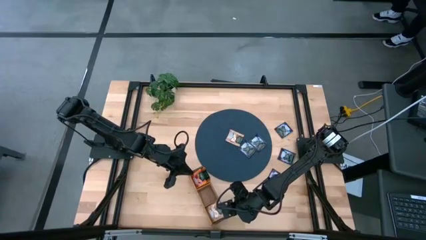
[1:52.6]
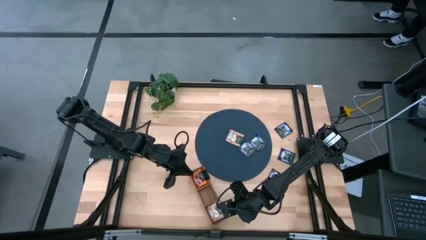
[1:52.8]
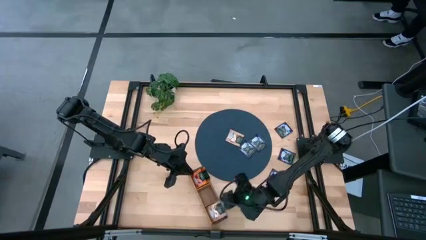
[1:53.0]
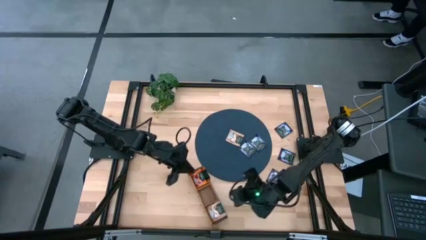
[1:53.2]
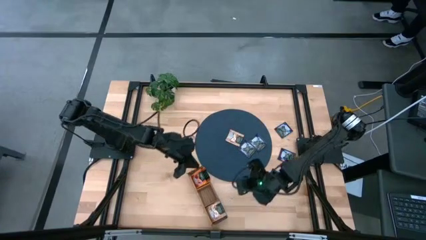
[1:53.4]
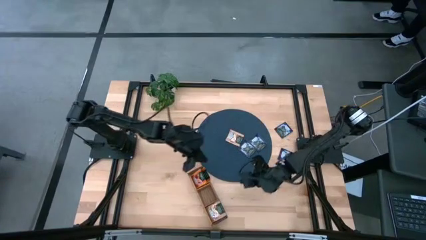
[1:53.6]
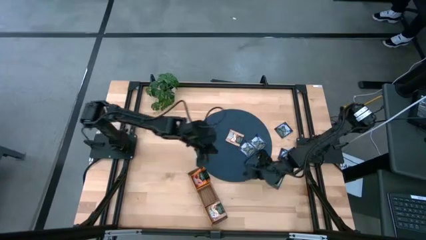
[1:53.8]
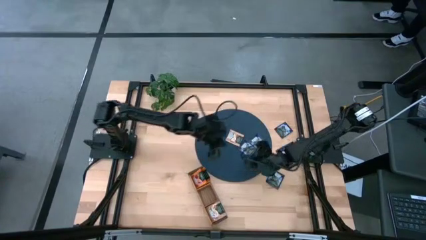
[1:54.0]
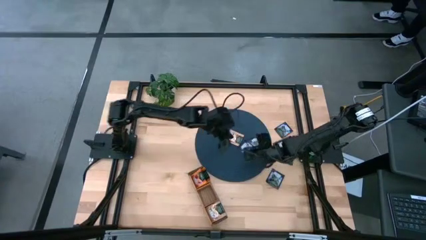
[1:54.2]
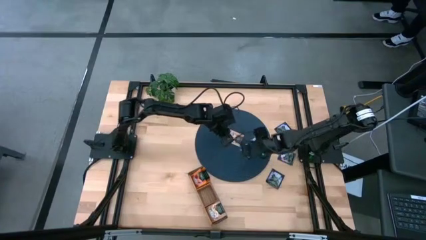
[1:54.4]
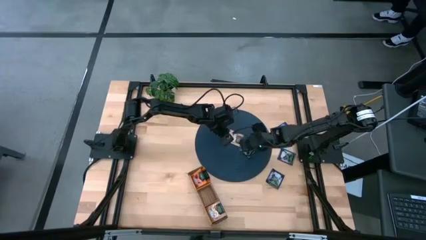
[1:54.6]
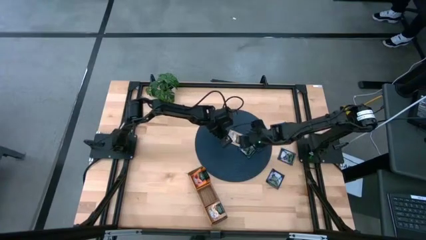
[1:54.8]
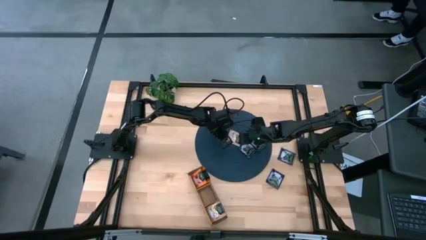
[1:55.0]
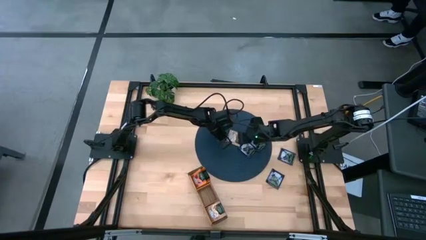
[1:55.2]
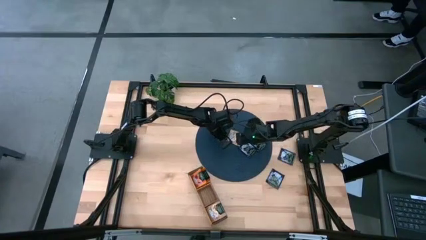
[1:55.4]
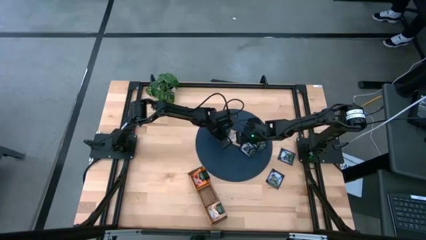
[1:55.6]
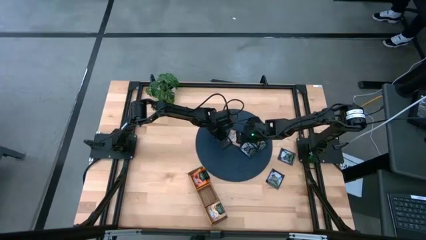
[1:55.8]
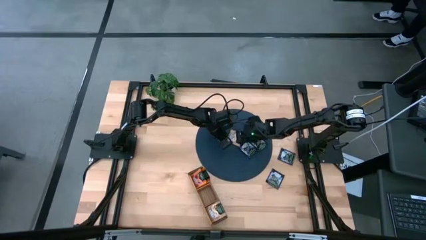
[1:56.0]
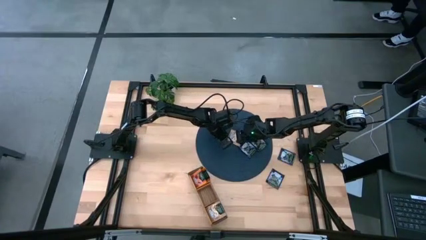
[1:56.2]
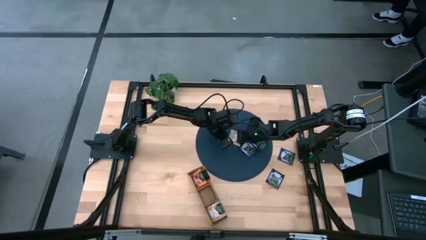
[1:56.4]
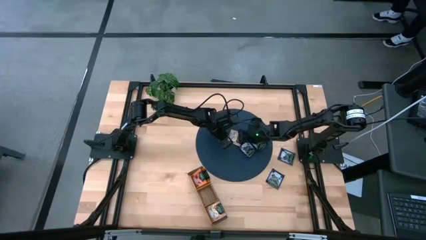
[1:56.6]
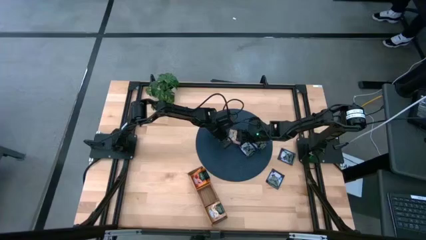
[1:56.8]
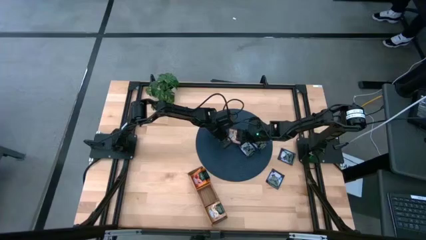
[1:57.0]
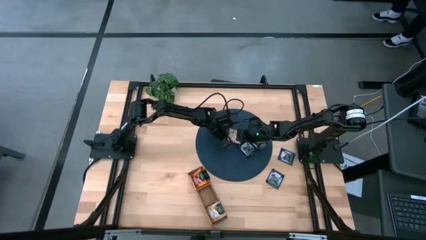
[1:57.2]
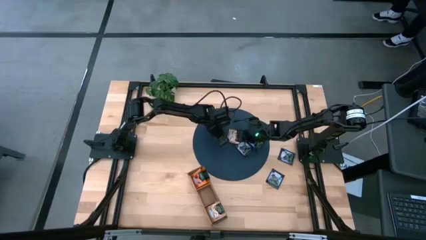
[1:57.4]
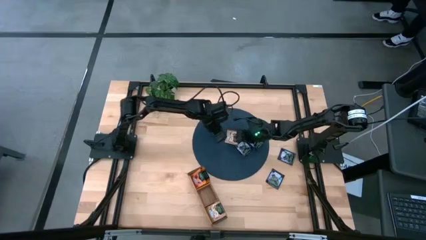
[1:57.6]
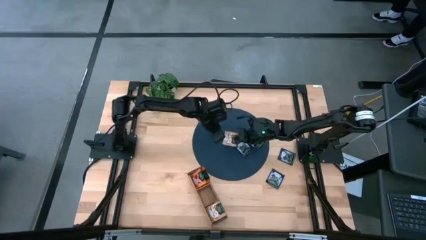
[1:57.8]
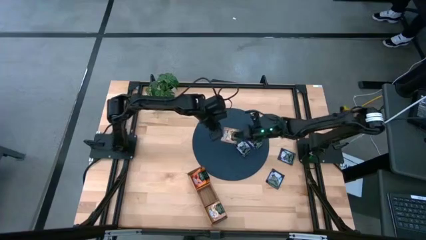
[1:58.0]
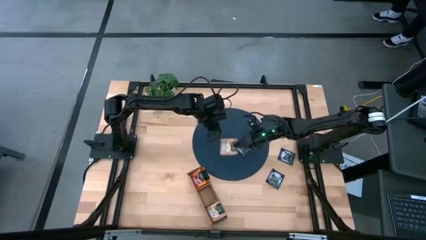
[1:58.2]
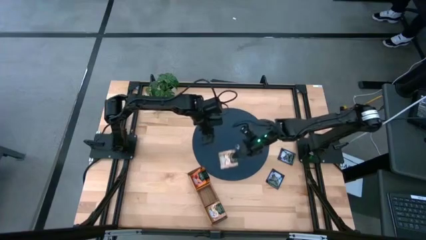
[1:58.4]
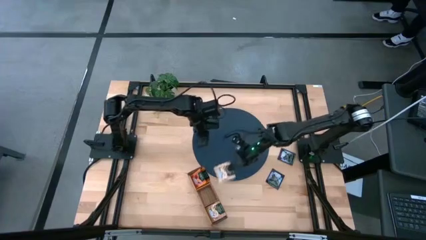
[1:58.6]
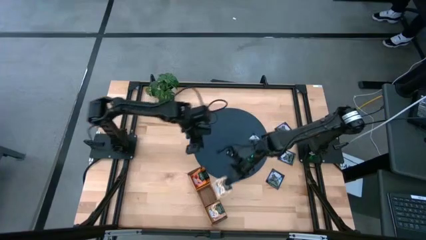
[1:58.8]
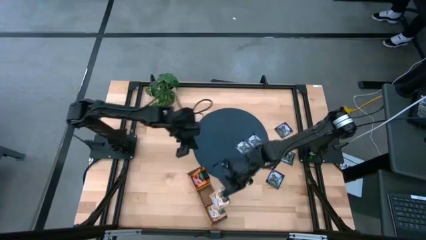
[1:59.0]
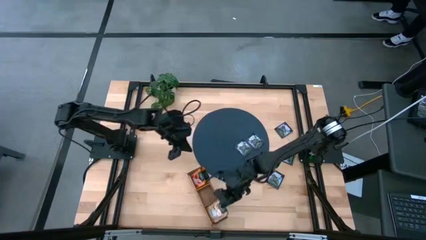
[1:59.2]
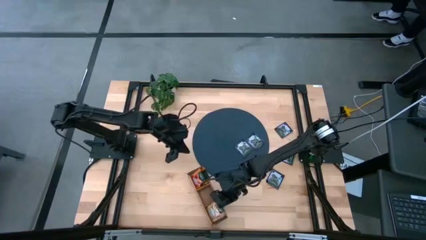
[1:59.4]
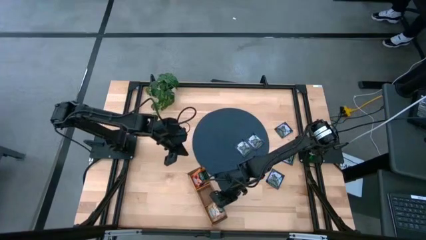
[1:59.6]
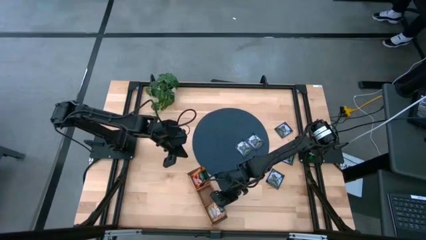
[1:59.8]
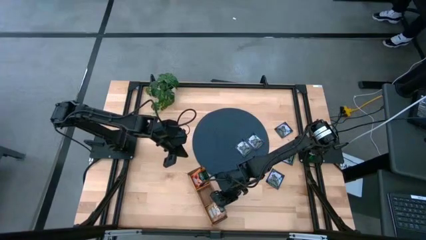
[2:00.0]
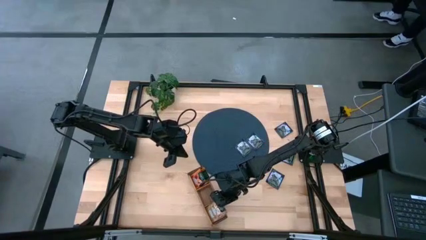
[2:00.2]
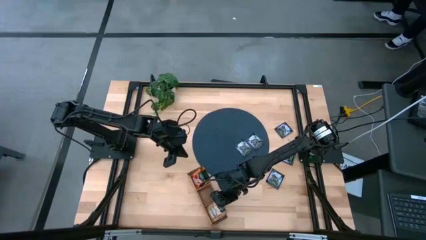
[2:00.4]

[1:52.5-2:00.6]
Task: Pick & Place Tea
Put the brown tea bag into the right section of the wooden organizer

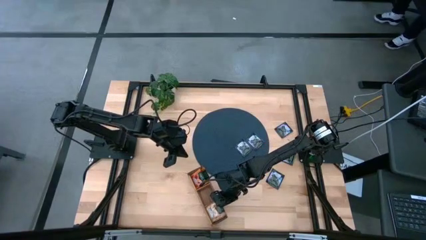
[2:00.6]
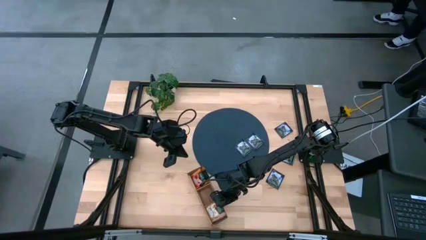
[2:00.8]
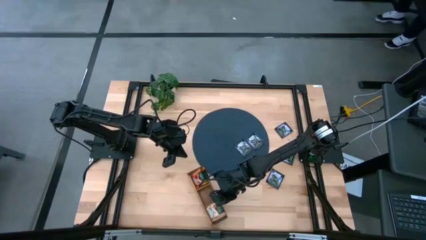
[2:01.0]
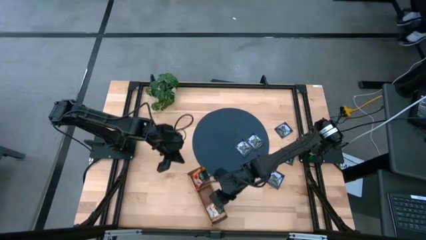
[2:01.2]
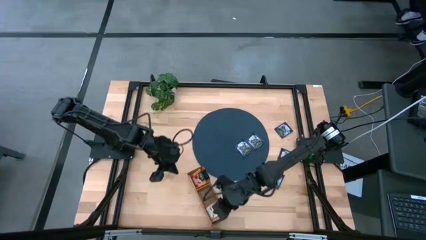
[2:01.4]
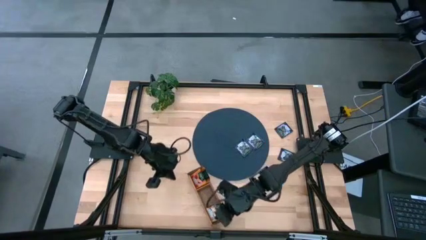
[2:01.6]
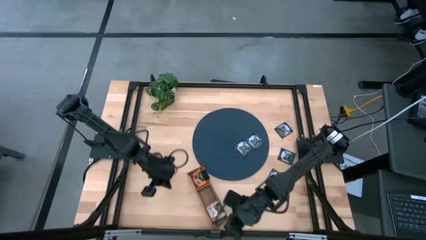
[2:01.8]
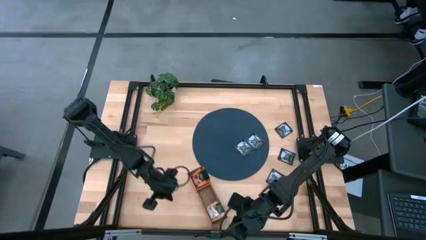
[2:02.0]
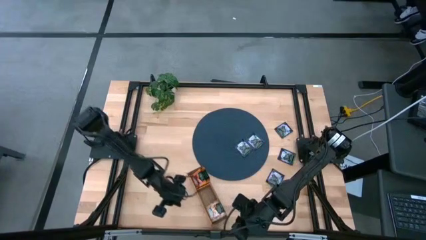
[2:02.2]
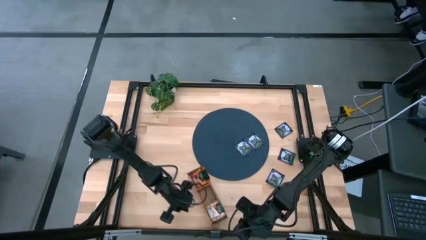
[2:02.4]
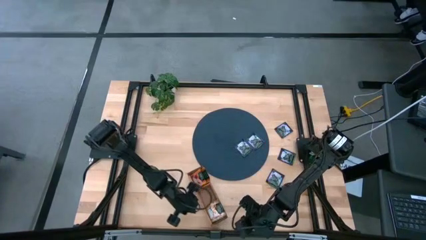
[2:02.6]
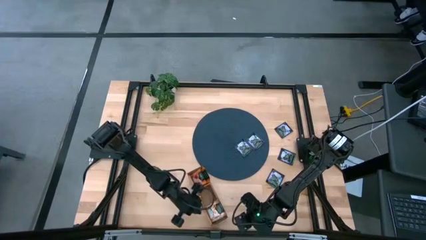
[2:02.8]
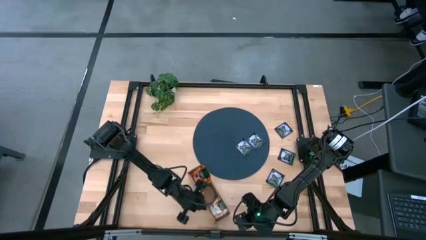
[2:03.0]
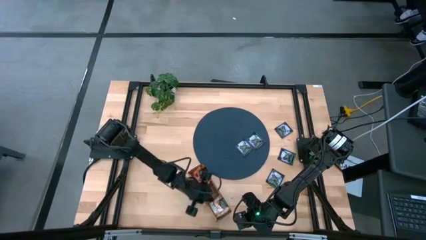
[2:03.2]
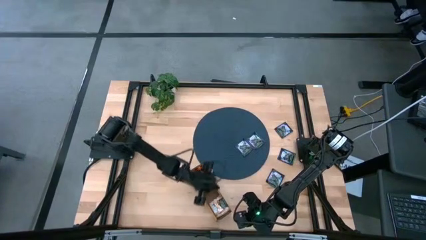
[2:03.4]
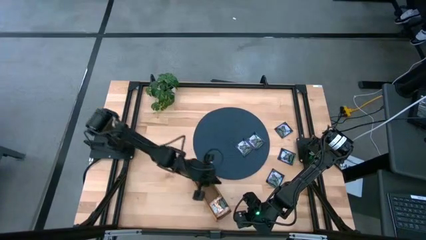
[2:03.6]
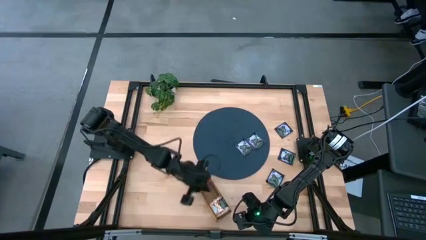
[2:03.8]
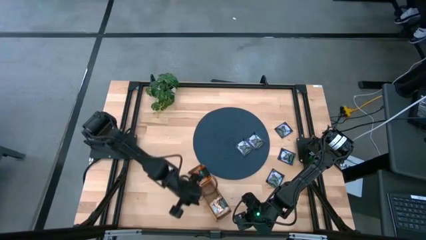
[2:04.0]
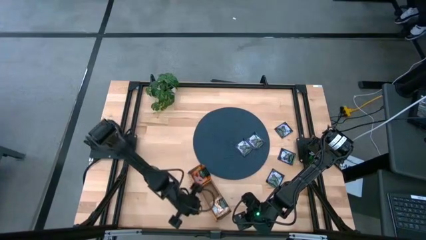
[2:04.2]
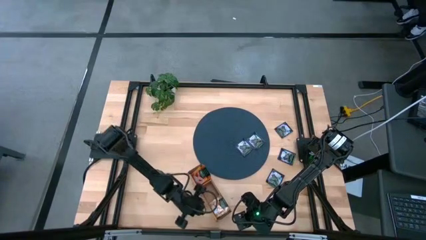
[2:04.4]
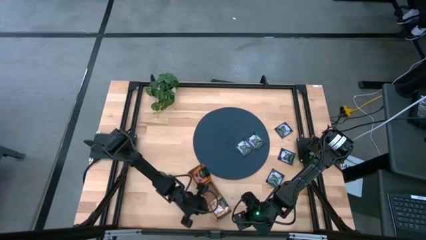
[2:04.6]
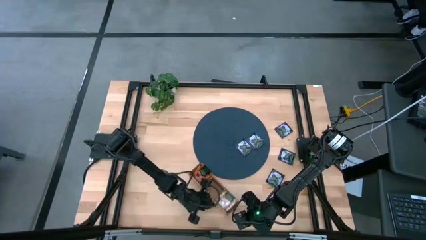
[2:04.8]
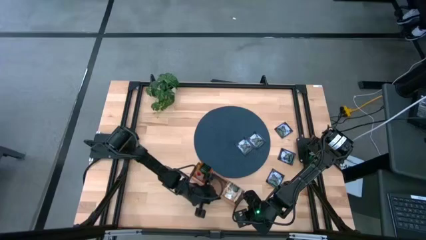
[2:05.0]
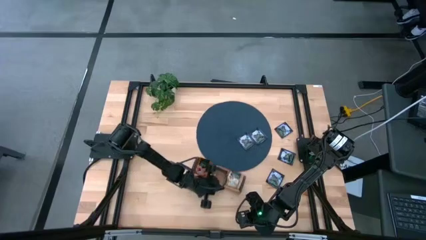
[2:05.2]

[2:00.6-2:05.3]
Adjust the wooden organizer
